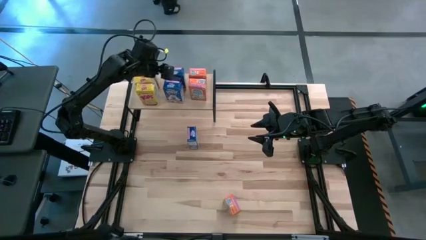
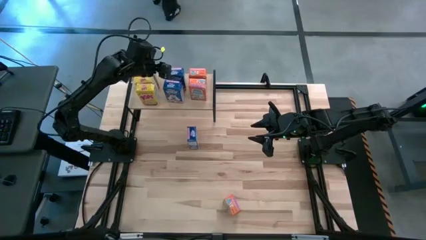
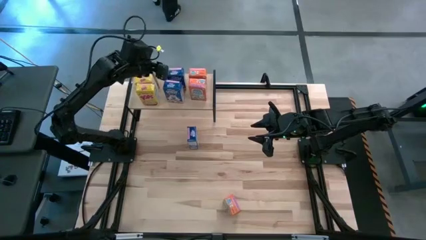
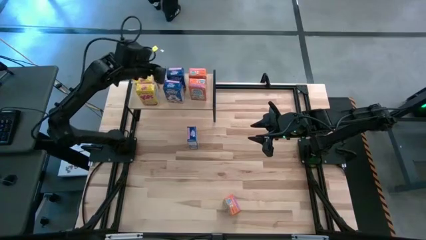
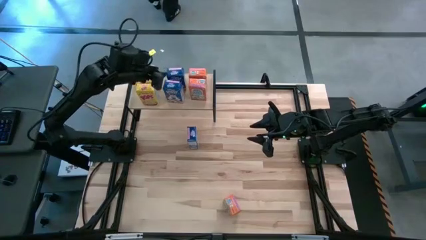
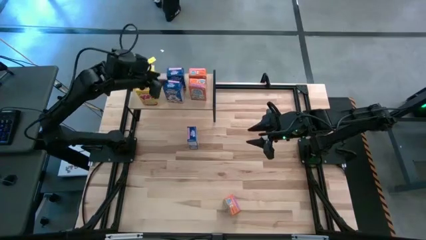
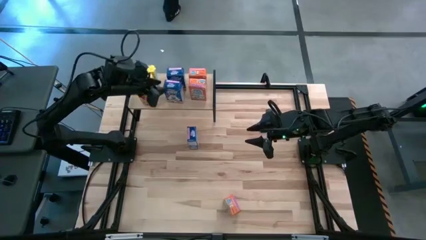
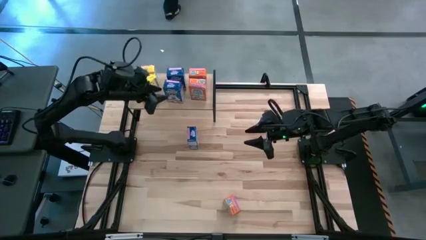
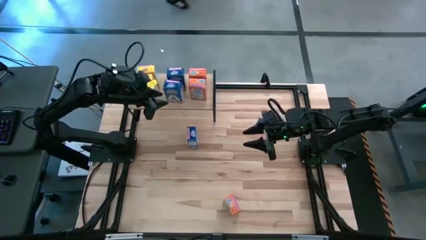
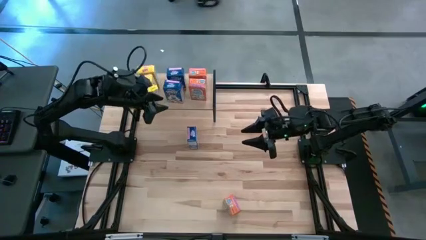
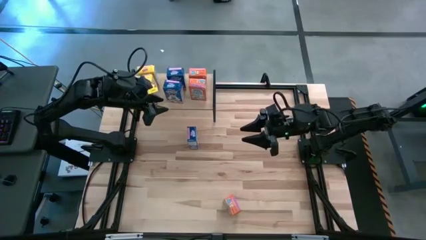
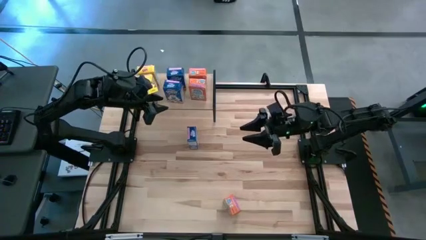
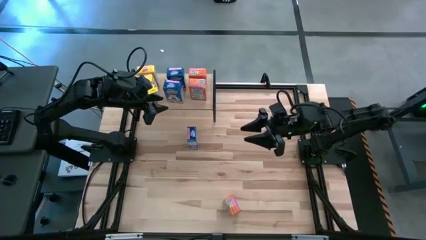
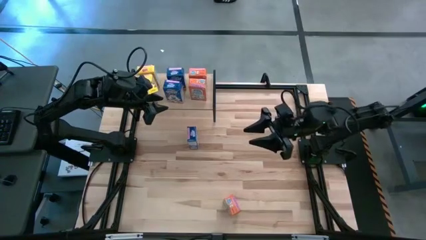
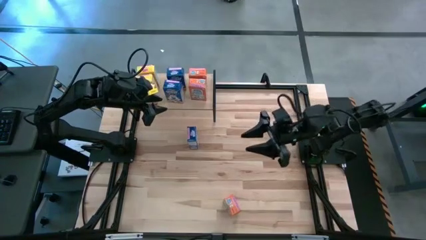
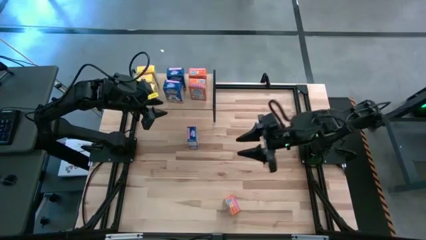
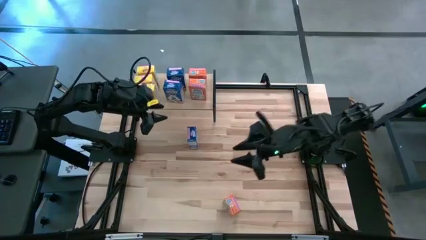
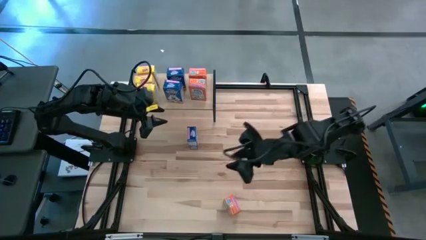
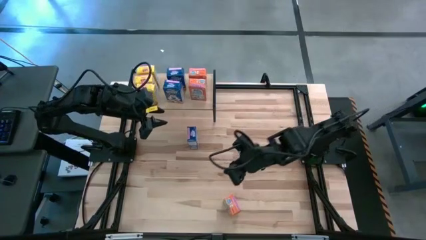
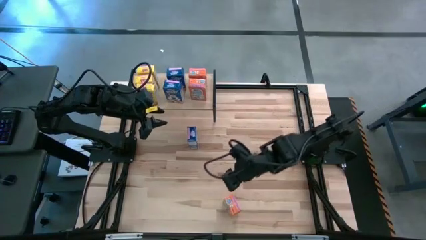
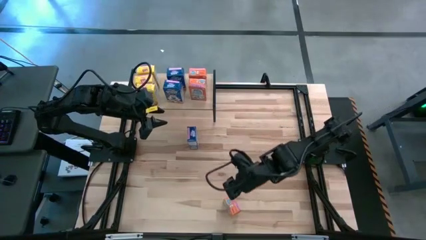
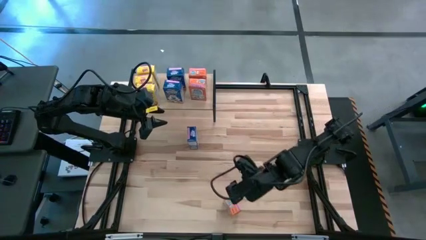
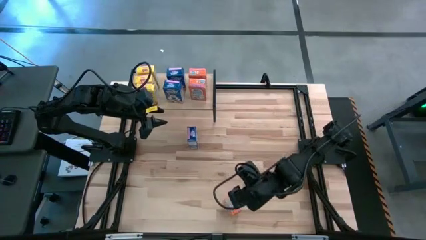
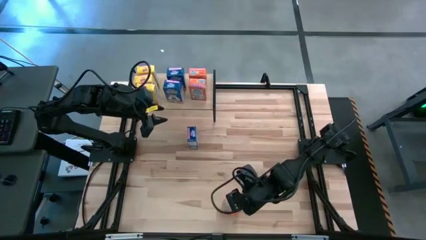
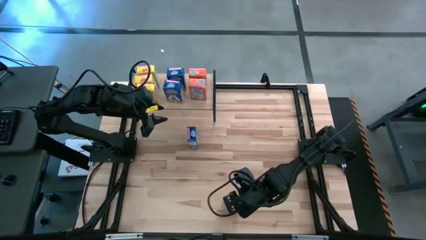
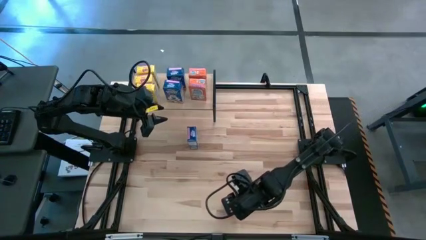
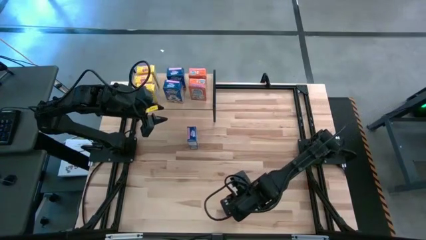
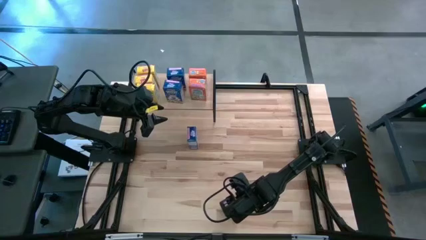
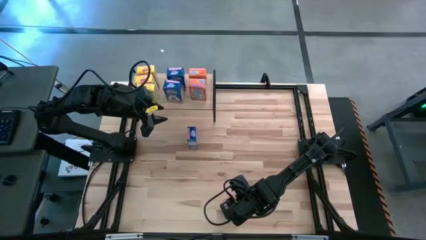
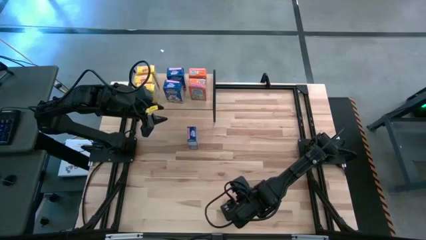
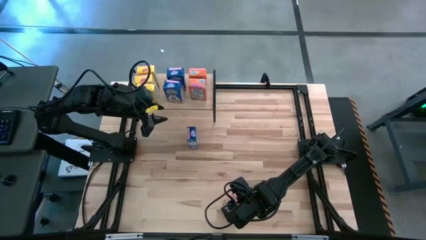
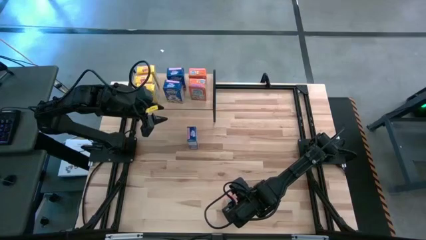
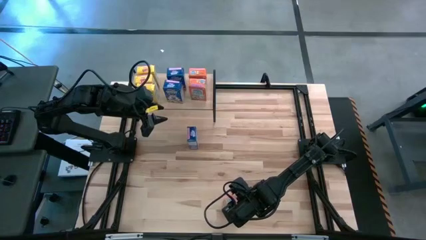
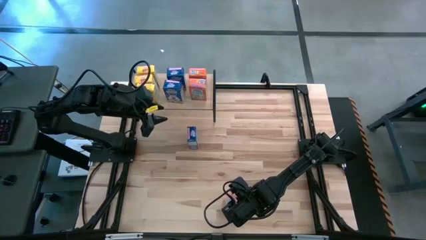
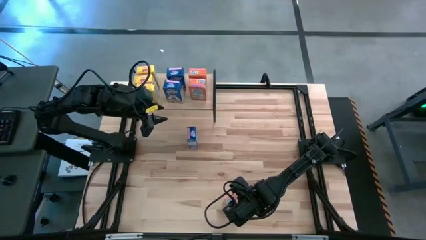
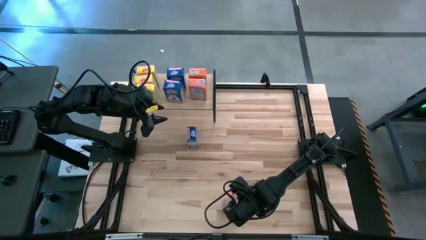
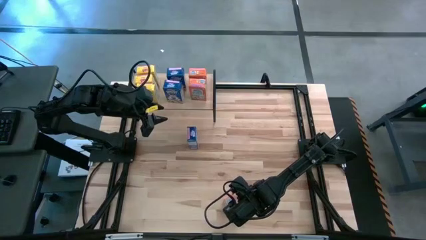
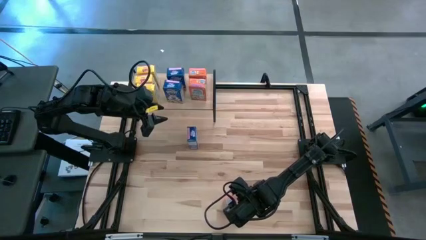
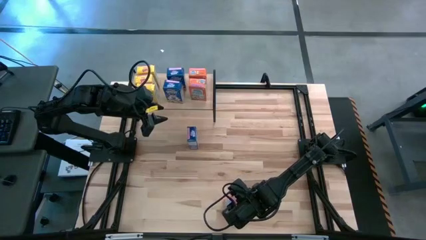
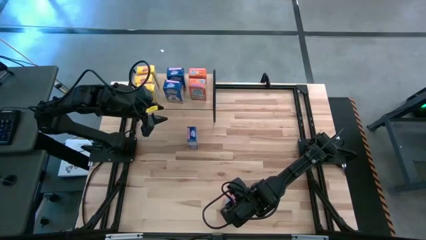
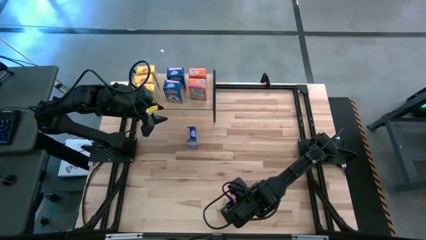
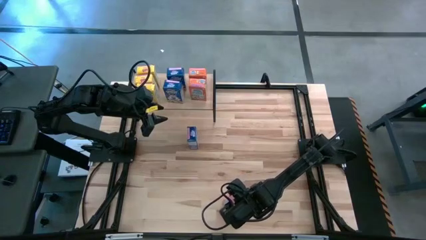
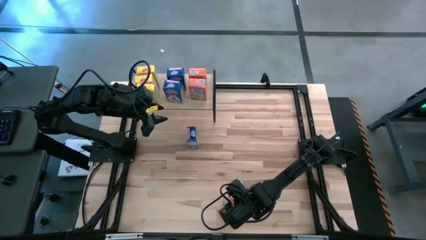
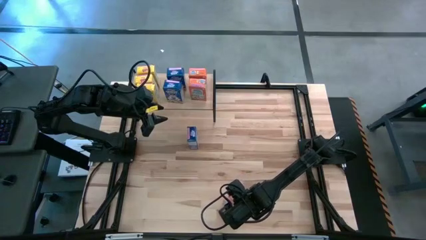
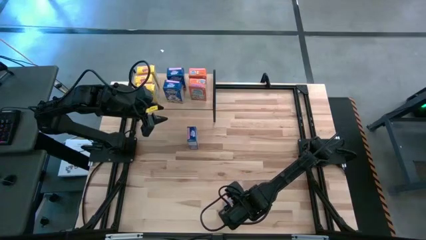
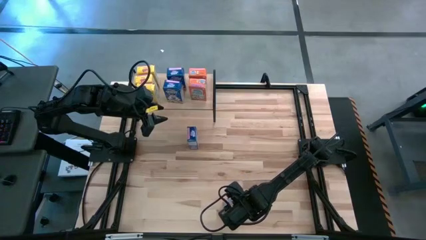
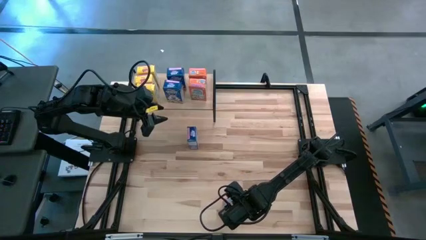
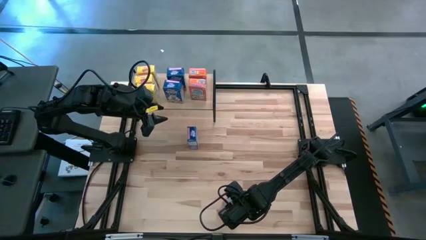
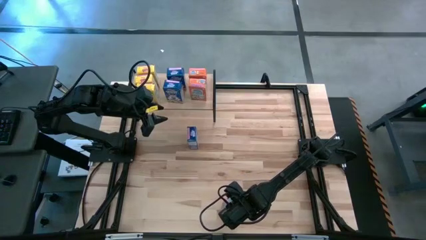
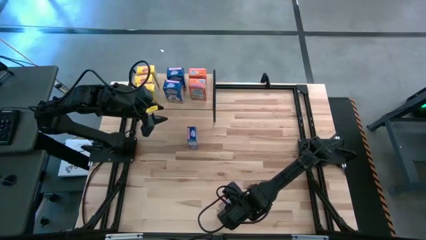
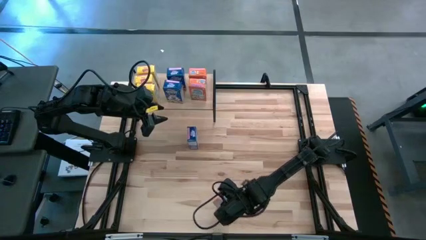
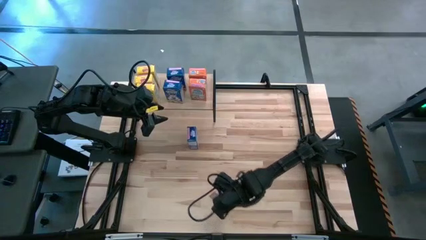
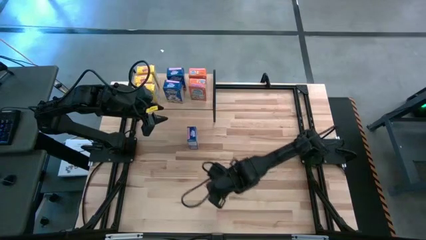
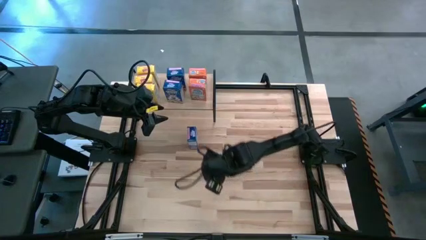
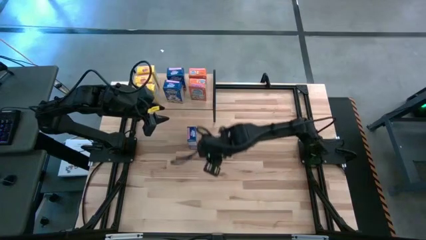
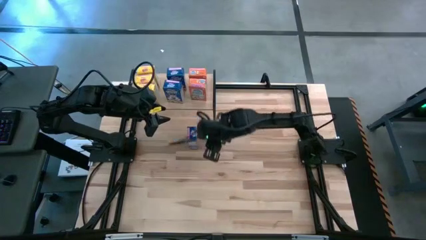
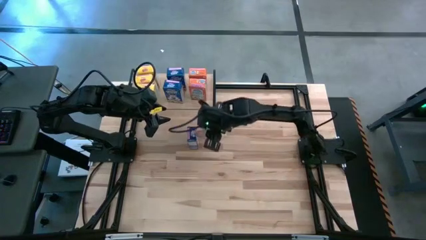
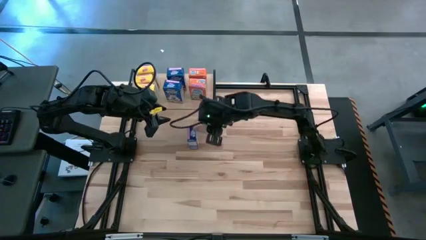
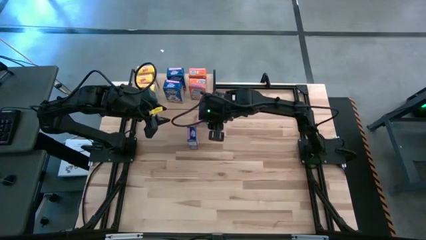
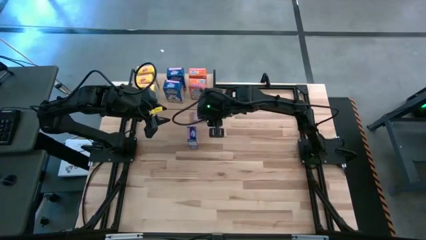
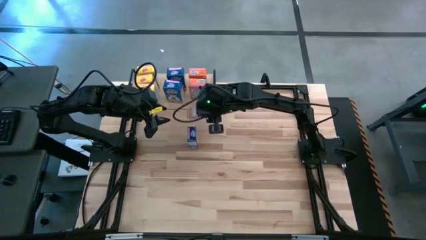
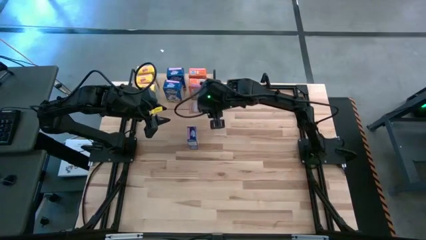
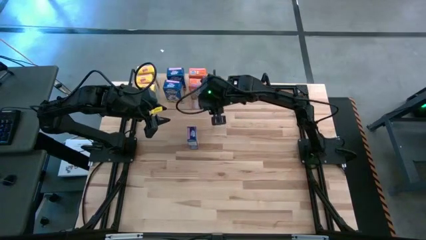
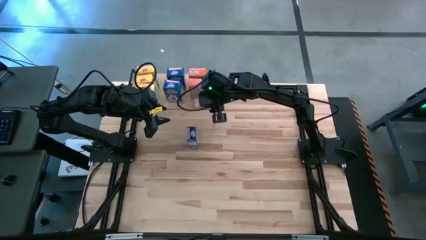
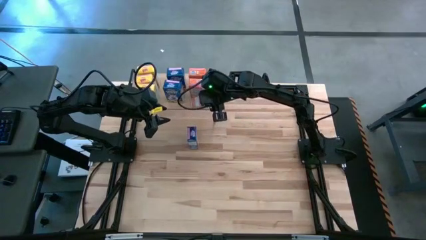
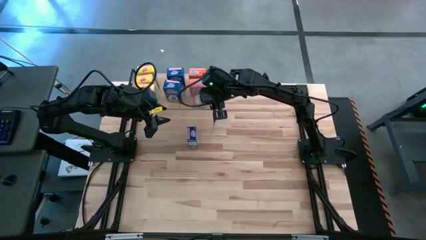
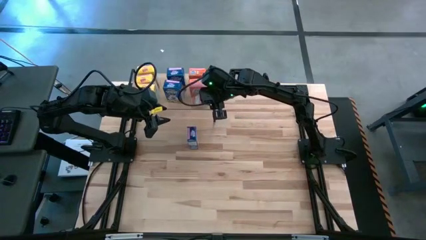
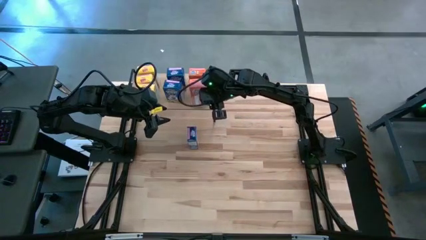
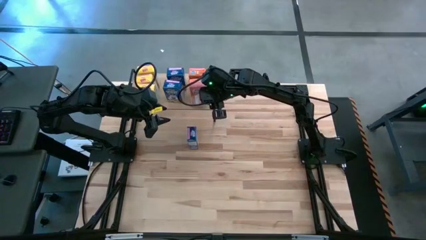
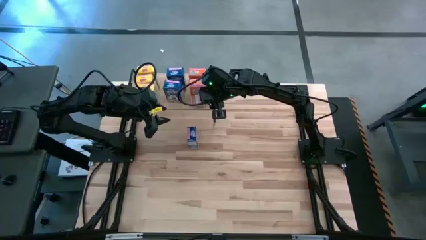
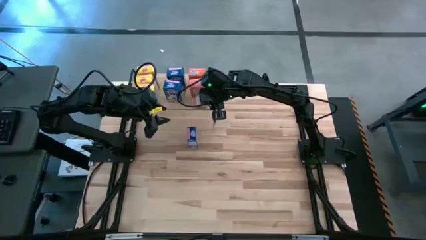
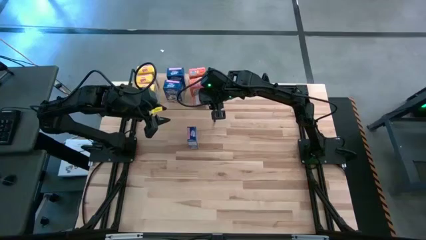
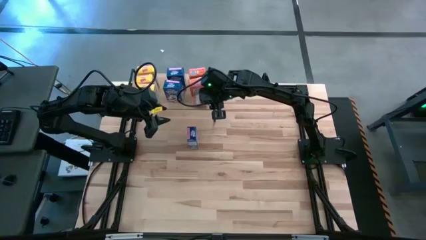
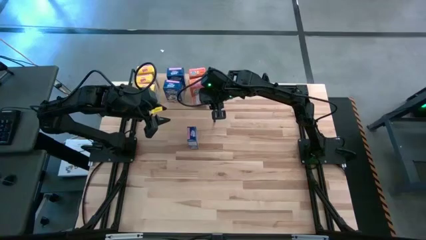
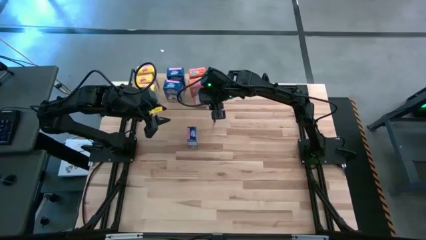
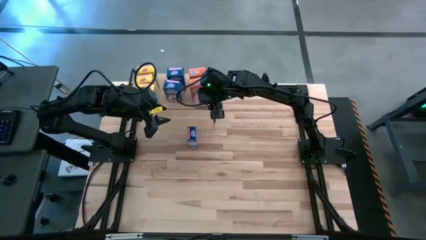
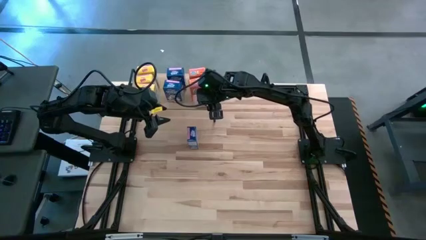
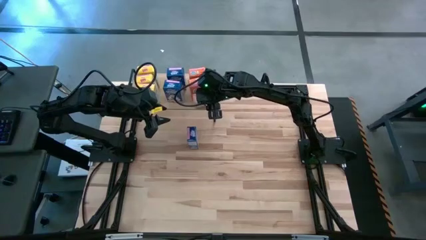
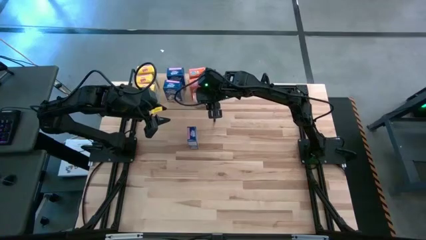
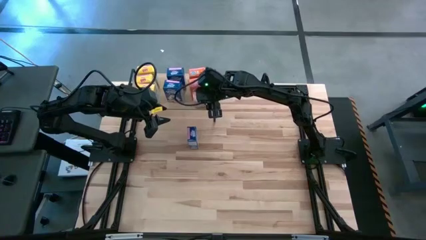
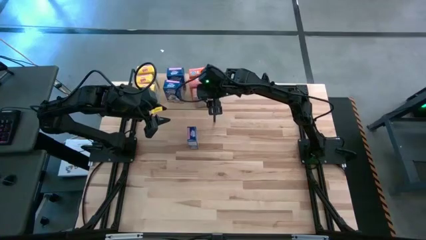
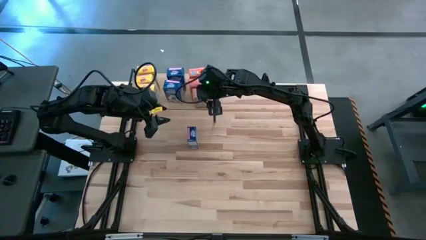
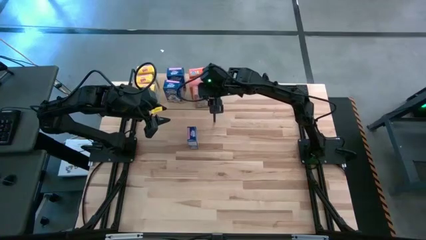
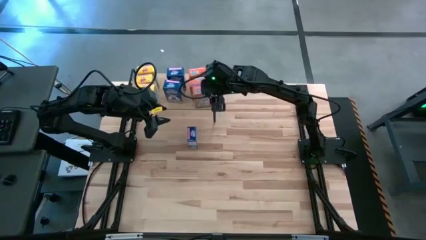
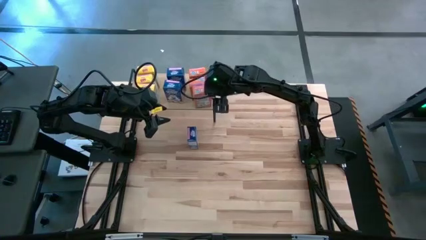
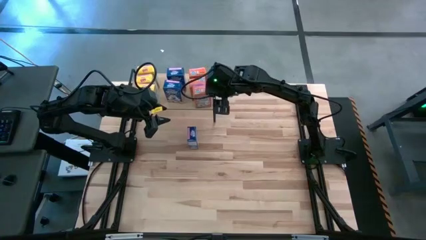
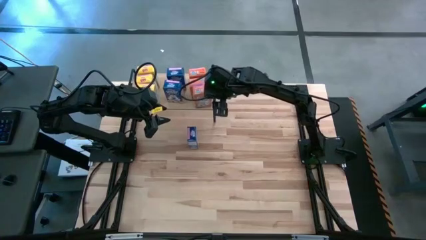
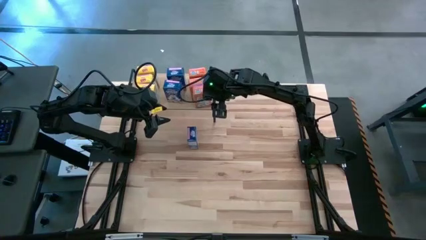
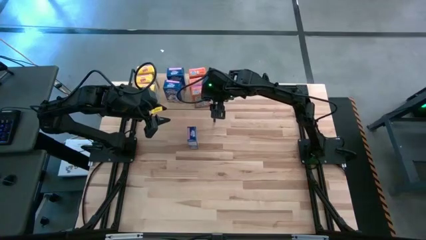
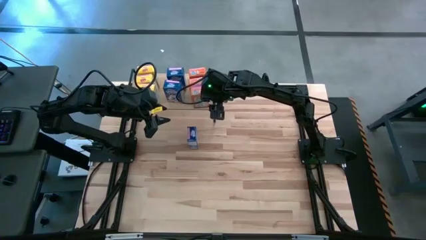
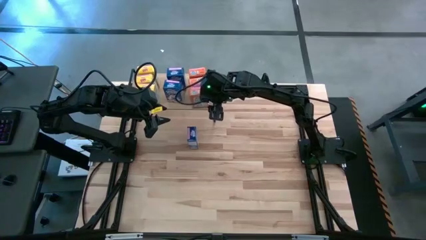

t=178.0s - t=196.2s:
Task: Stack cereal on shelf
Put the orange cereal box on the shelf aligned with the other orange cereal boxes
